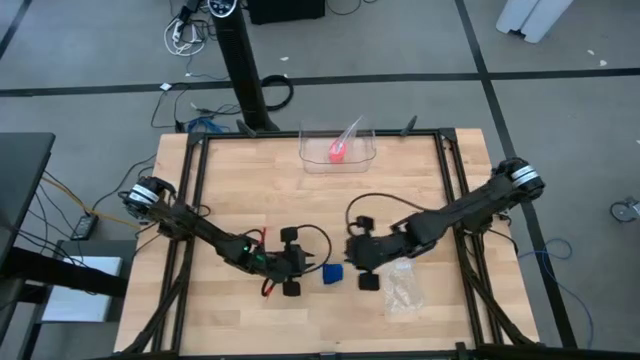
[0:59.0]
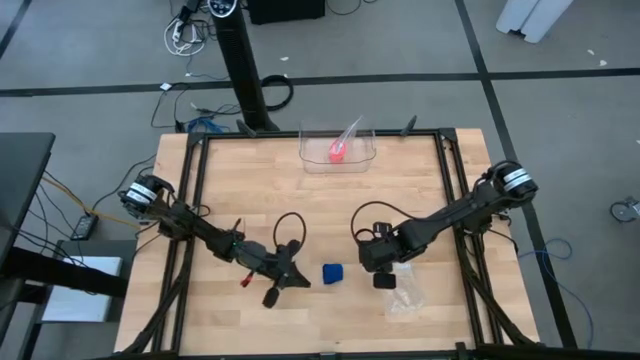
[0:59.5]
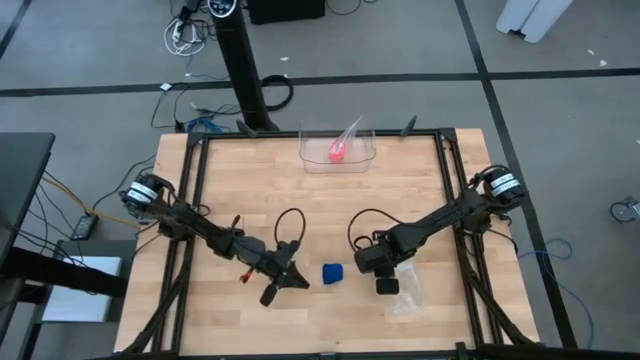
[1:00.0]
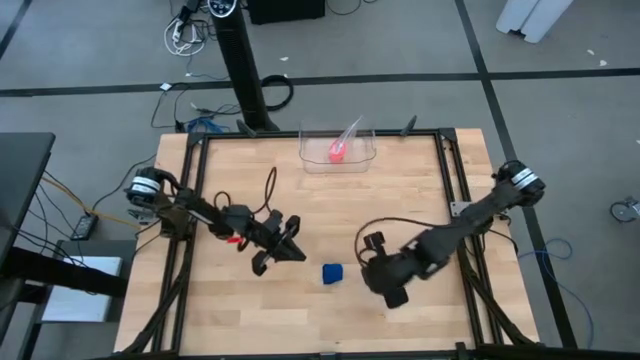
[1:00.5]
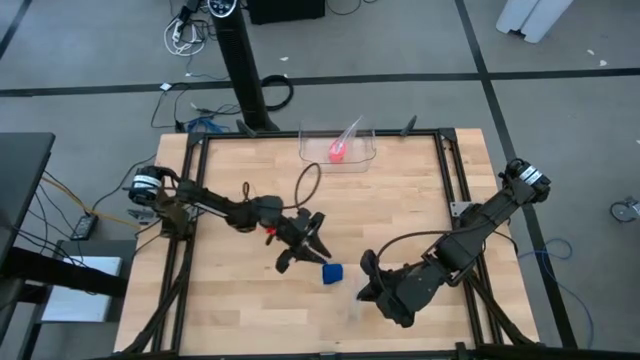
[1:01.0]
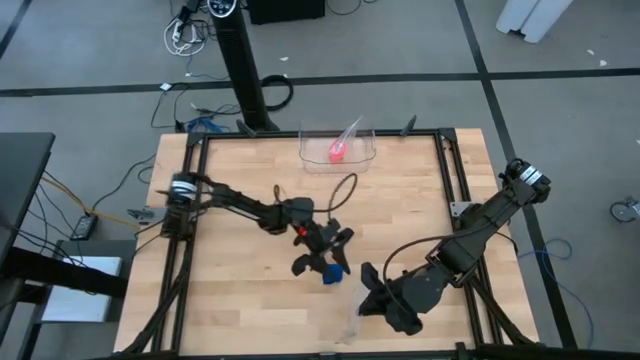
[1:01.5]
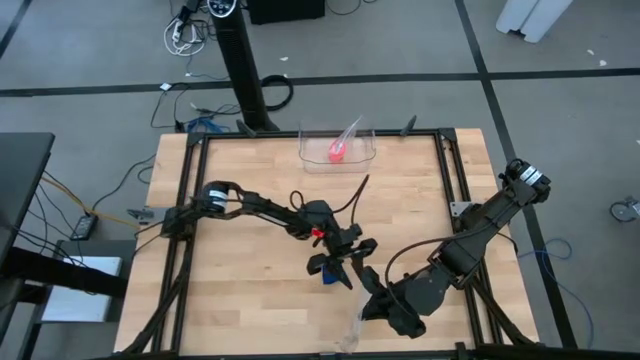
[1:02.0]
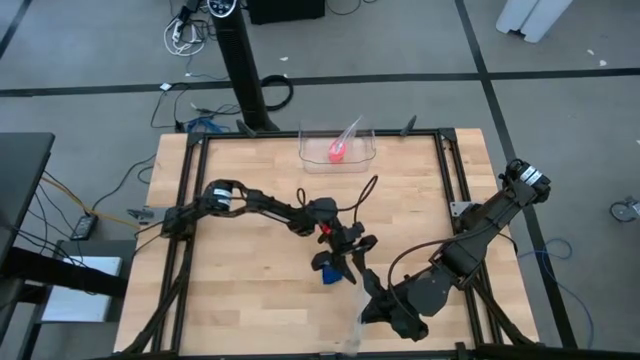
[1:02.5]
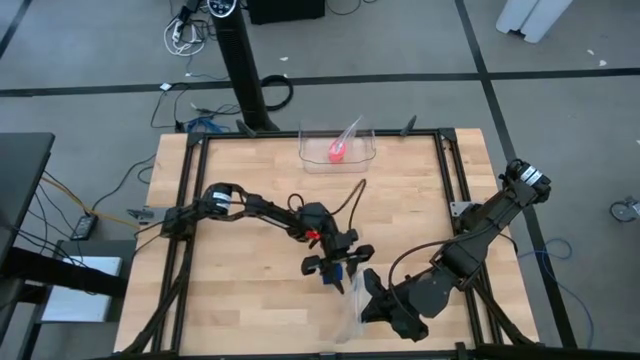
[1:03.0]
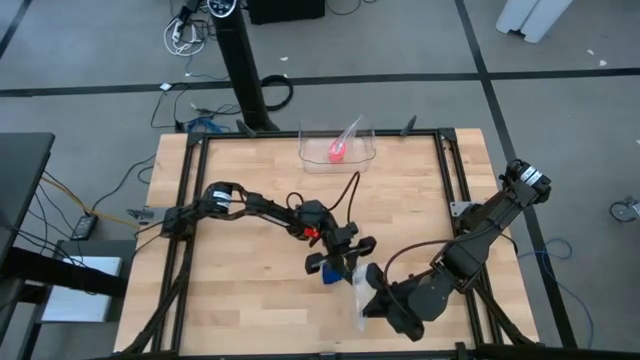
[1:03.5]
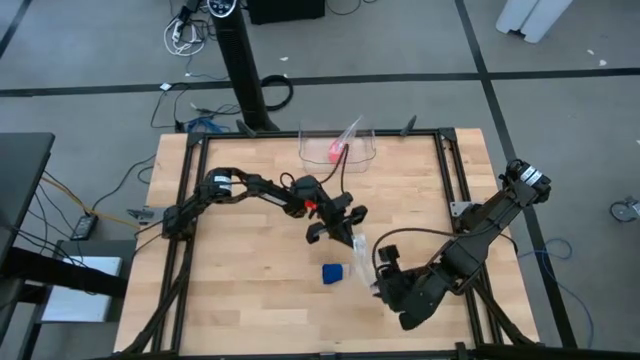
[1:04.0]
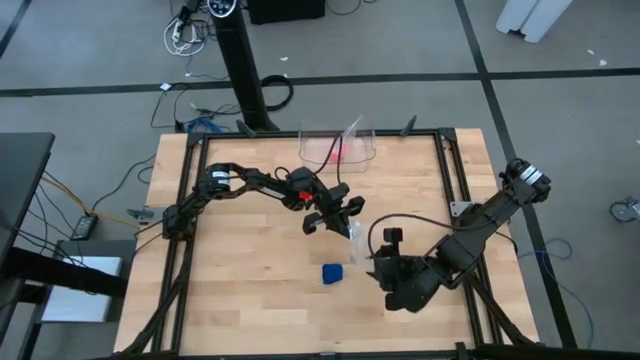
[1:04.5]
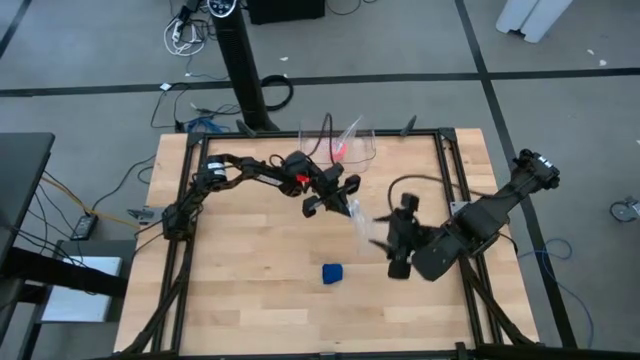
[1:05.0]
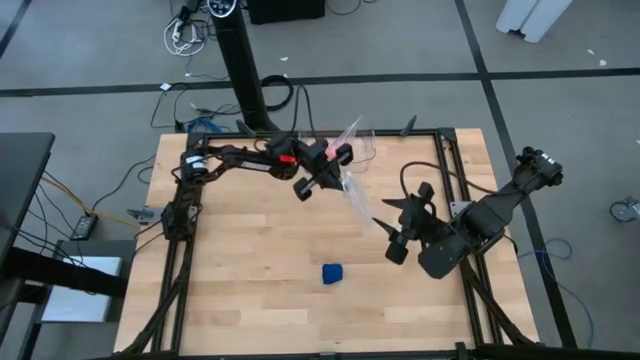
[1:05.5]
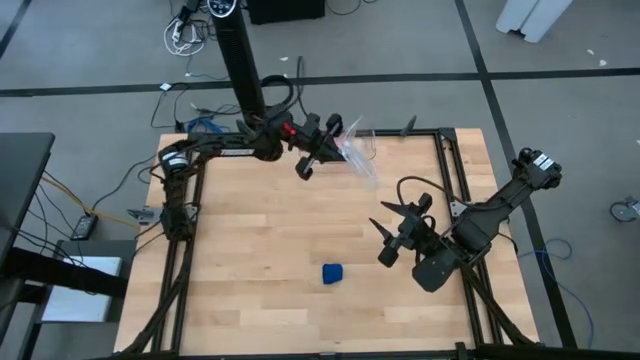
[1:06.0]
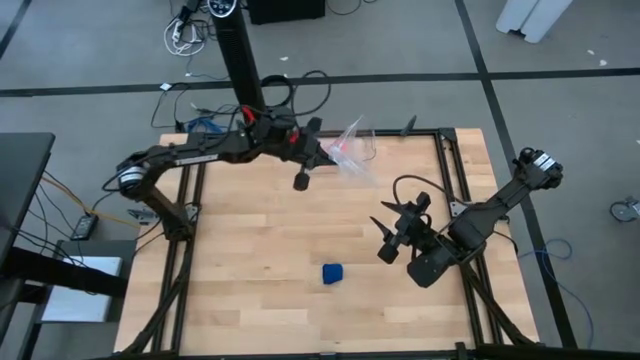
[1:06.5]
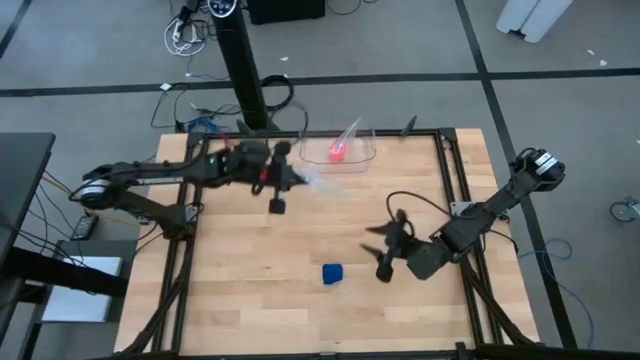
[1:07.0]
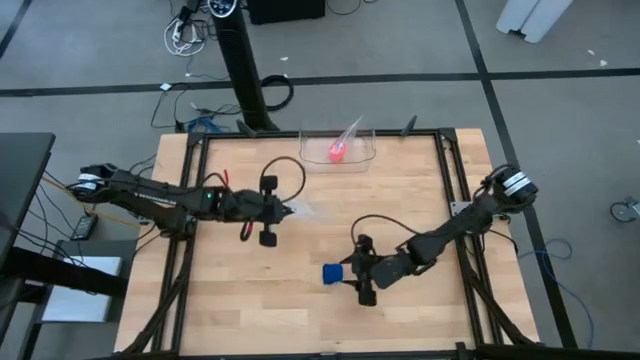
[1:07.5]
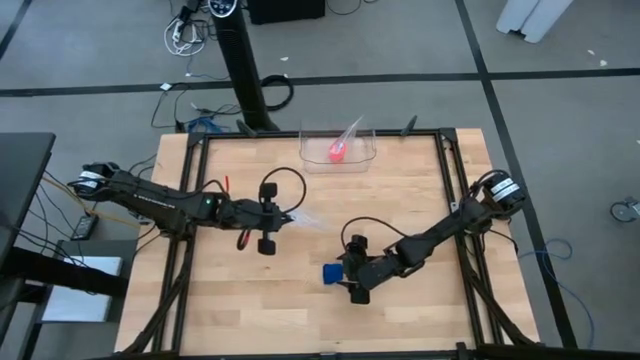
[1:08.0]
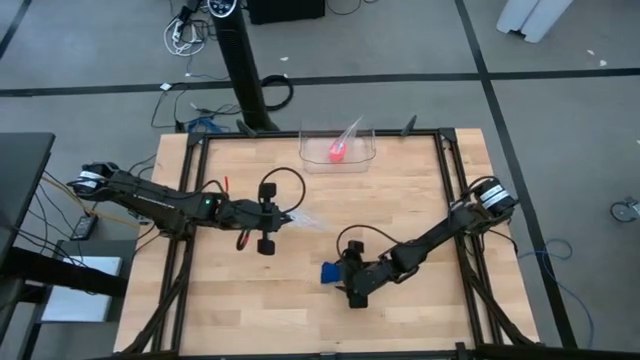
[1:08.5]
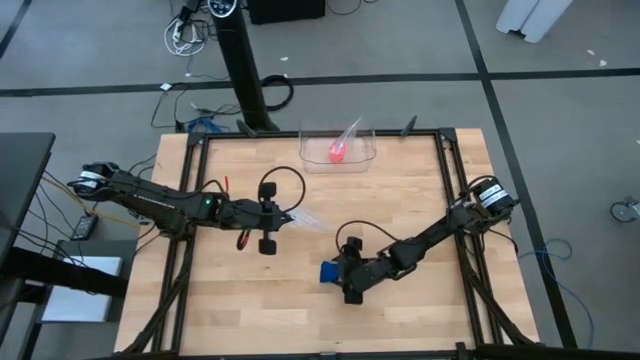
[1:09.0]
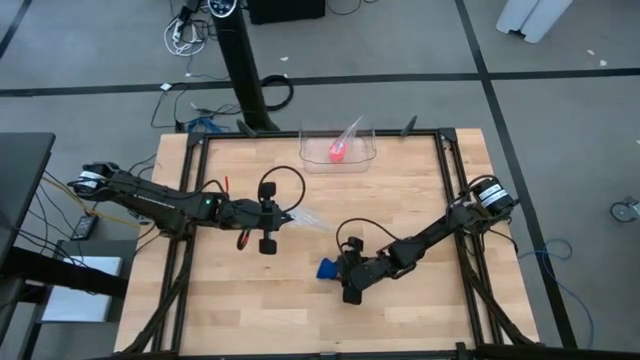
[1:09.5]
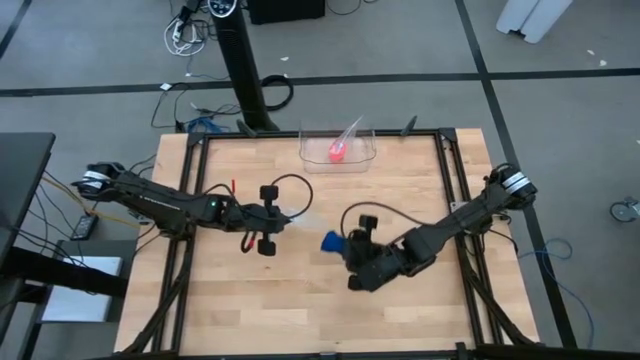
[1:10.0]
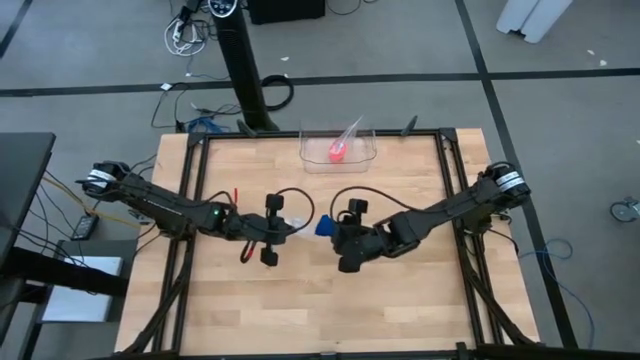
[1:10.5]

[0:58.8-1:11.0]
Task: Roll bandage
Put the blue bandage into the transparent zip bag

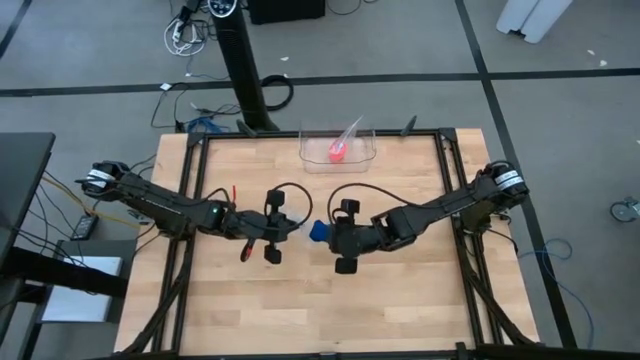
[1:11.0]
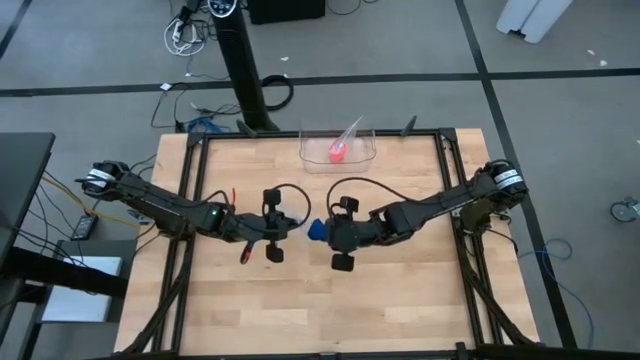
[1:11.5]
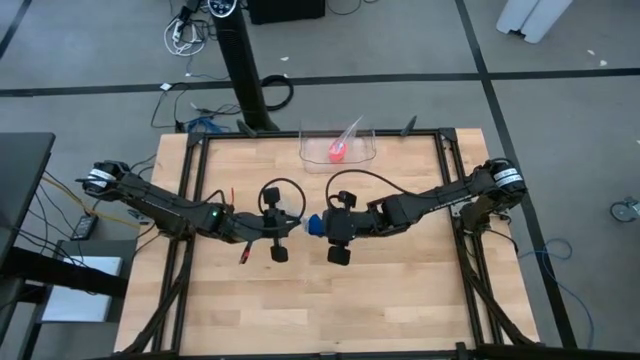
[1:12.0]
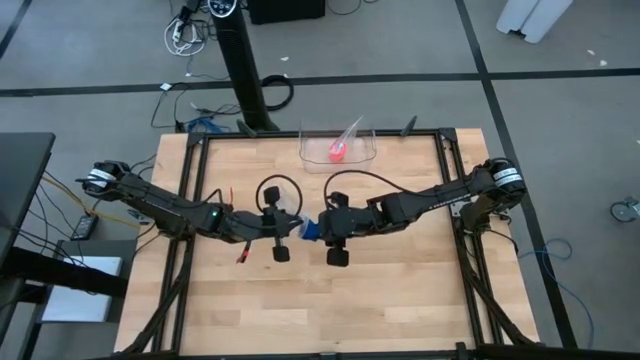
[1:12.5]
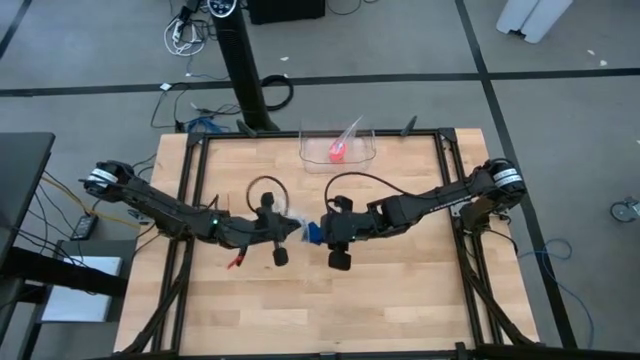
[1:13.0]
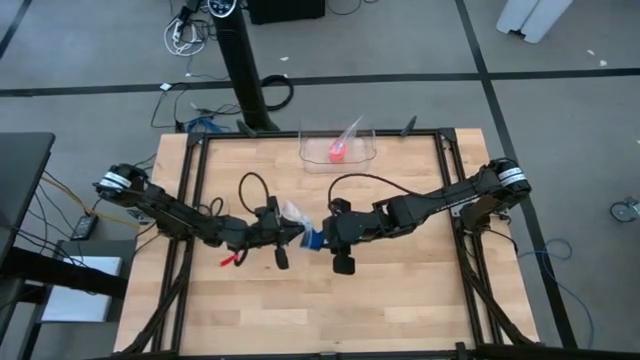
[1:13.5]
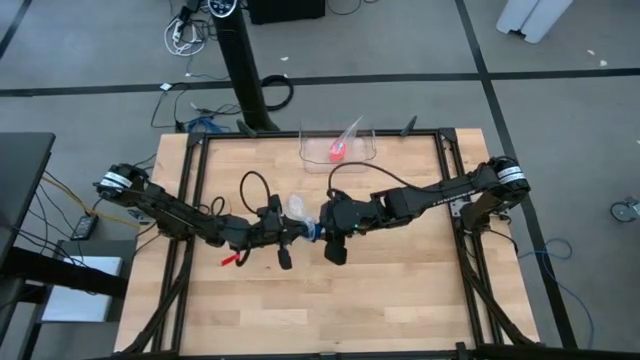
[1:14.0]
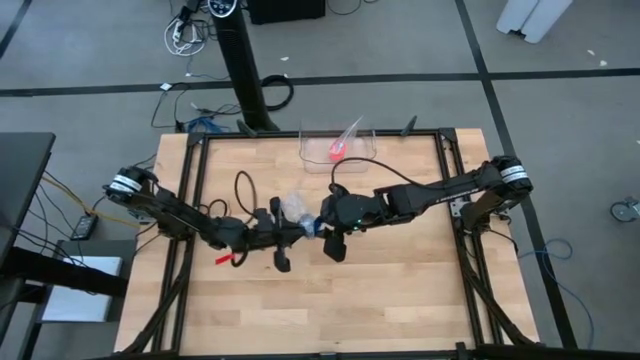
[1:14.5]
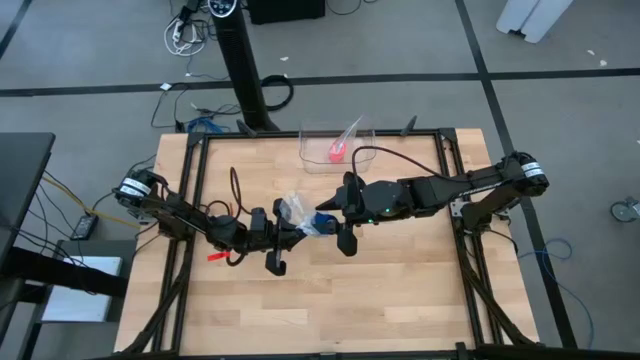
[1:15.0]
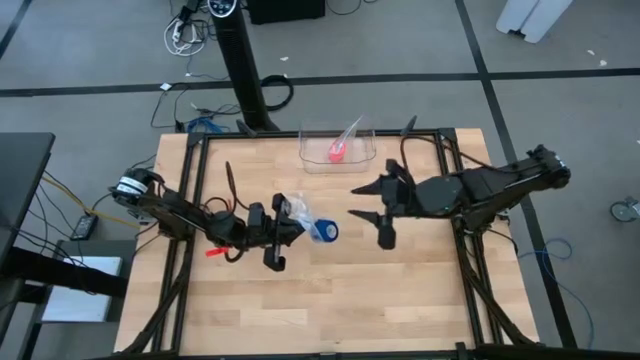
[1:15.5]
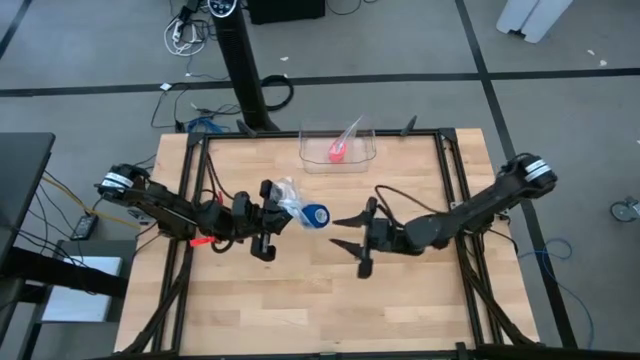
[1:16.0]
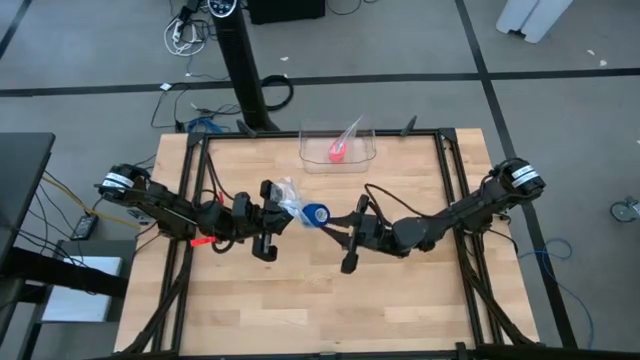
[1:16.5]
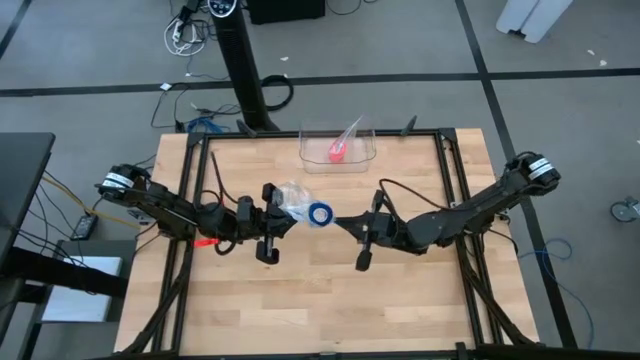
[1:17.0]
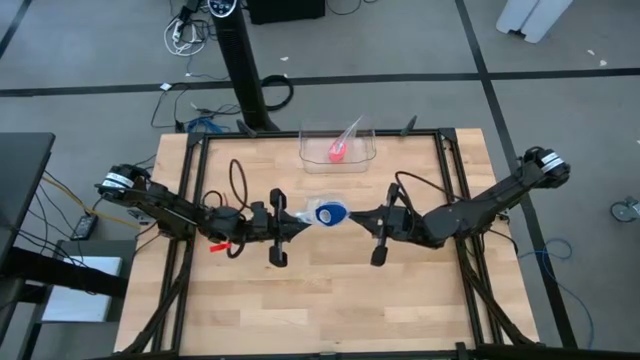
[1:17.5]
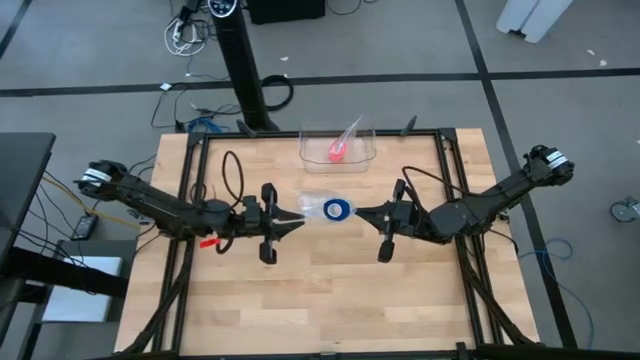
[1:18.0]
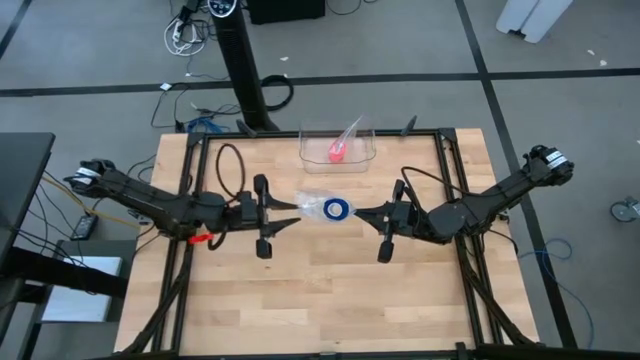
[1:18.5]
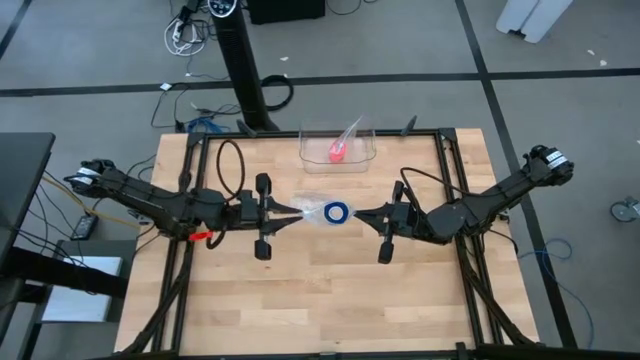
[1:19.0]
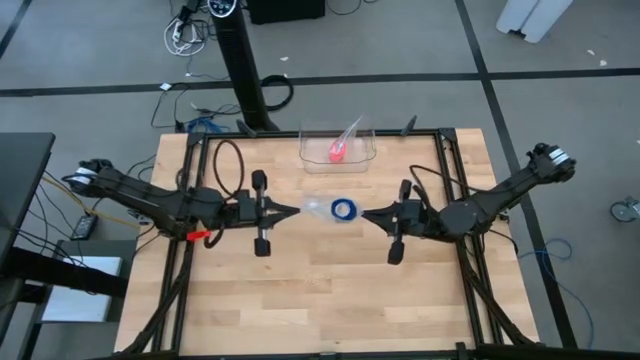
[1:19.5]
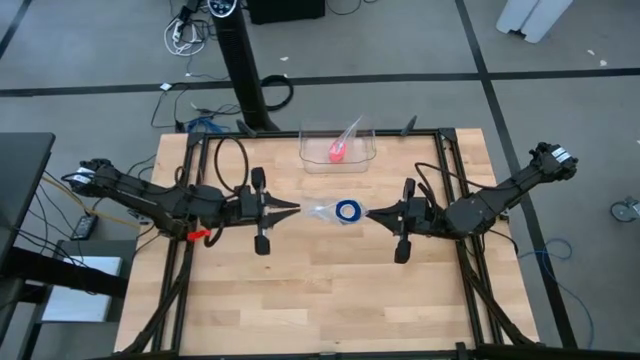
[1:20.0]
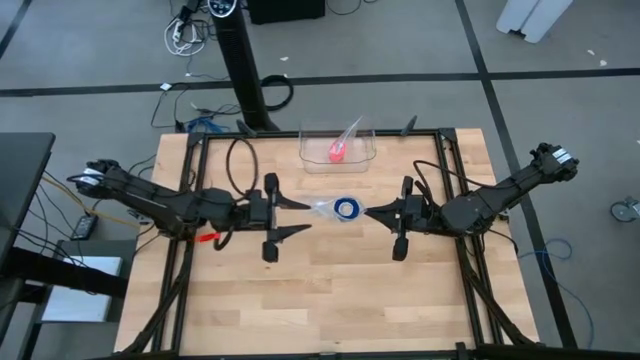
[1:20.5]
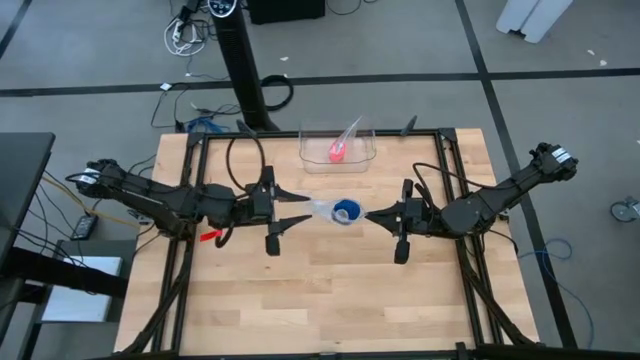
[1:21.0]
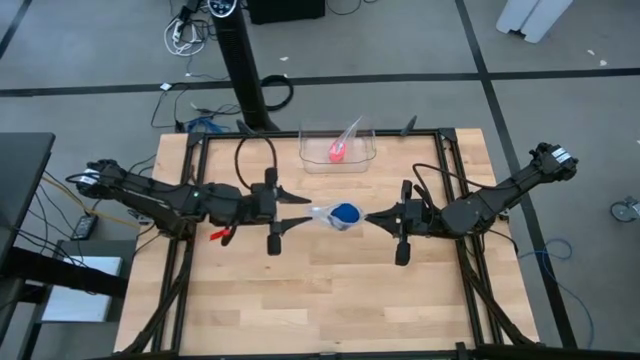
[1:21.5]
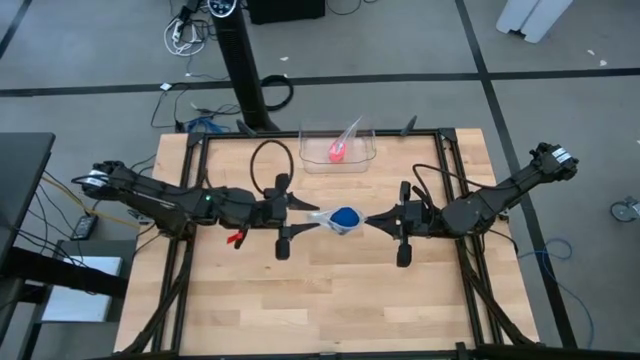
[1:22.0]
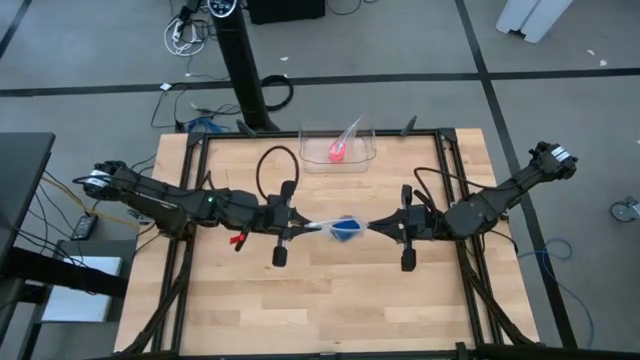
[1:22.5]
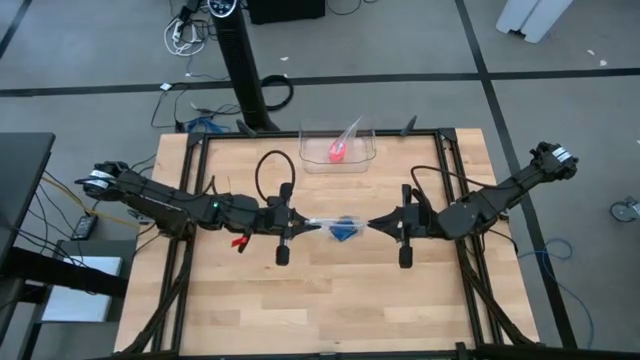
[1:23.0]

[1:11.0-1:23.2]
Put the blue bandage into the transparent zip bag
